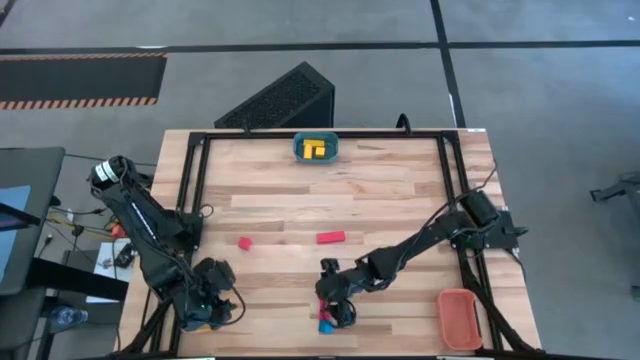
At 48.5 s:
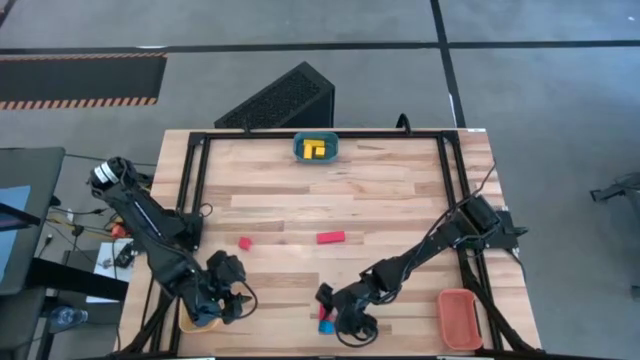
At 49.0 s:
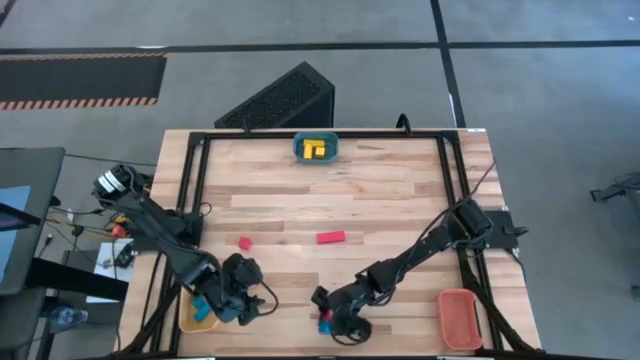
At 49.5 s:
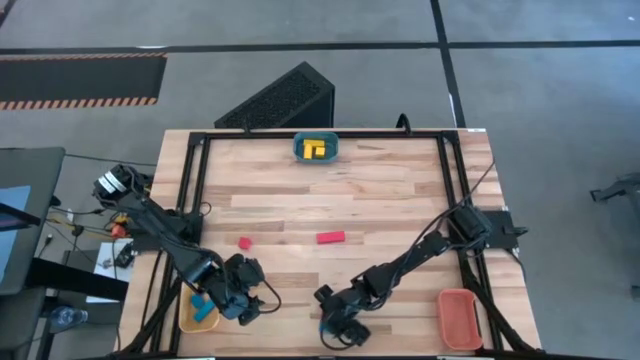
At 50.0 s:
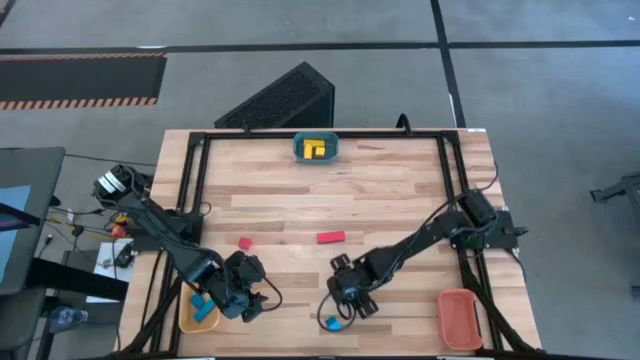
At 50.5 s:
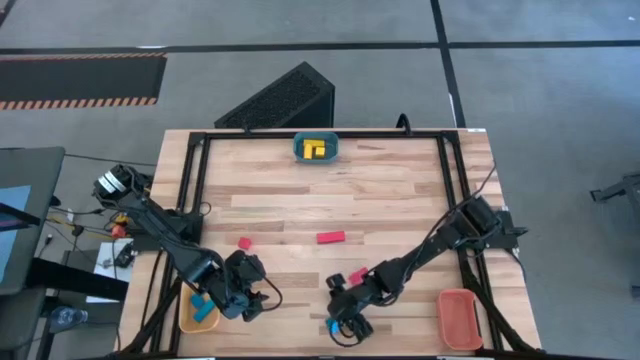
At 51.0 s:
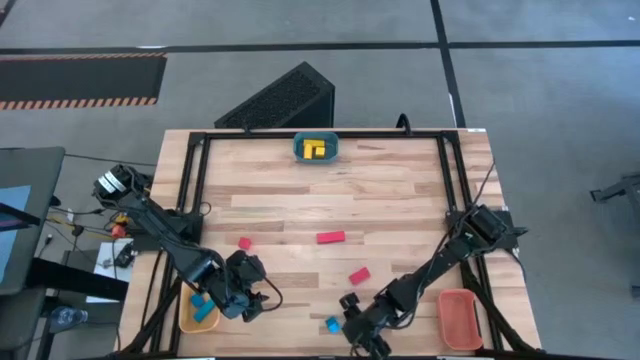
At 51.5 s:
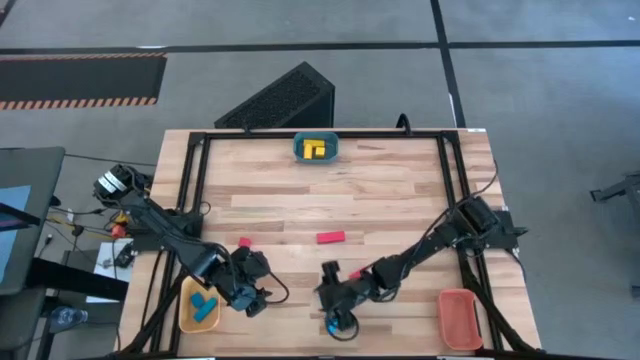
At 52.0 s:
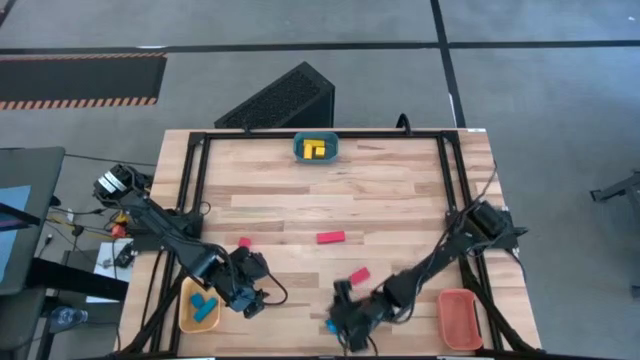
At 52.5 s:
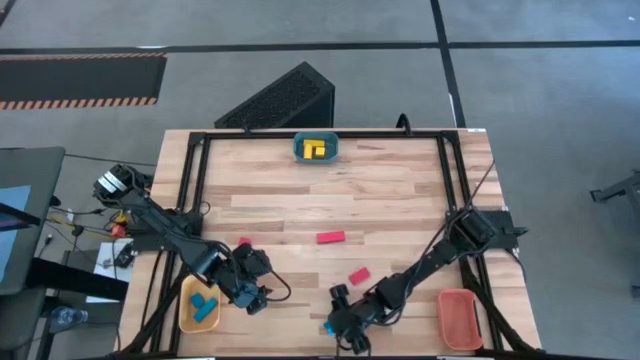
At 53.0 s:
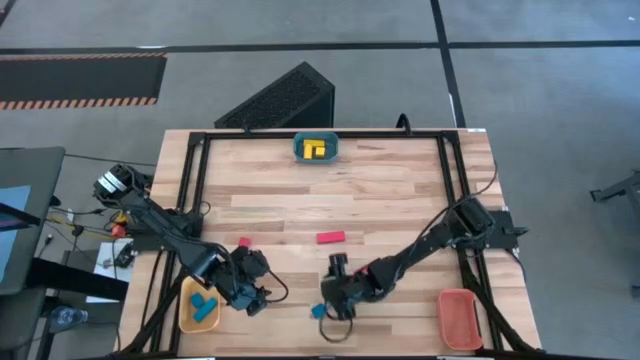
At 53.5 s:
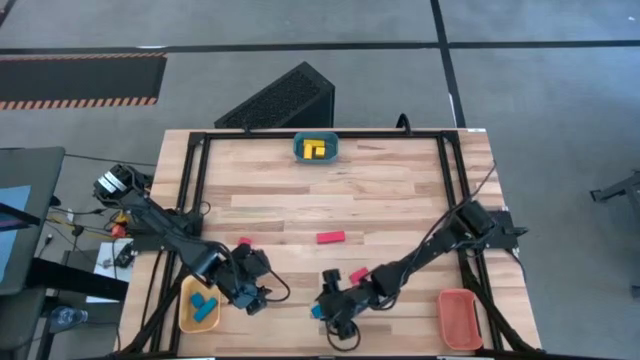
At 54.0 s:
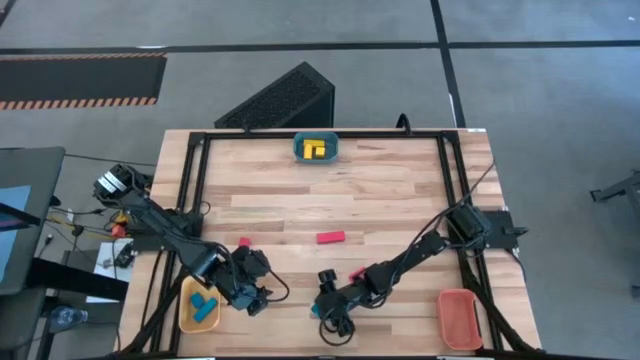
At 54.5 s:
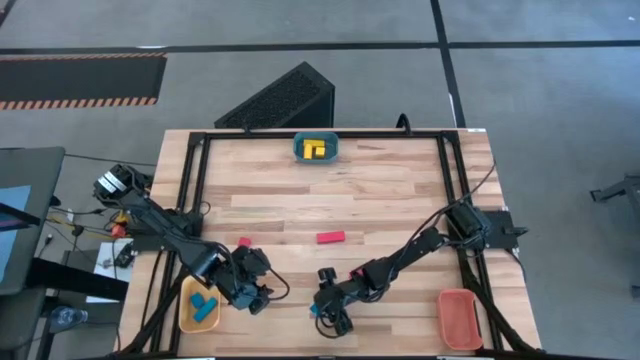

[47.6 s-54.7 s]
Task: Sort & place blocks by color
Put the blue block into the yellow bin

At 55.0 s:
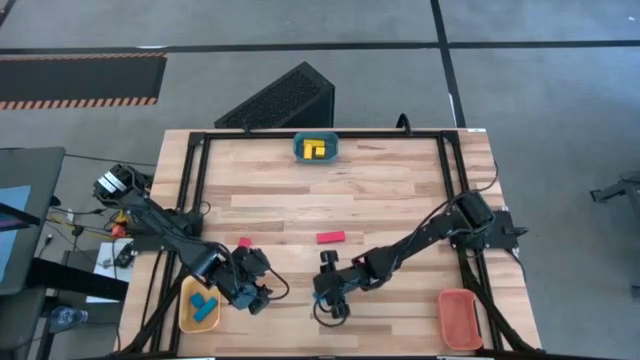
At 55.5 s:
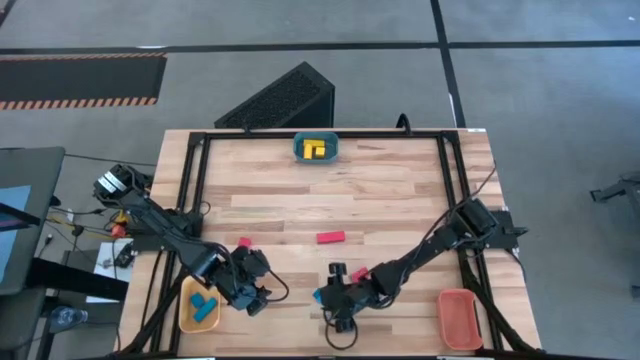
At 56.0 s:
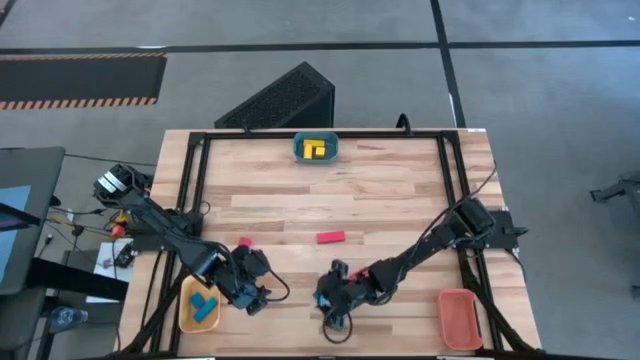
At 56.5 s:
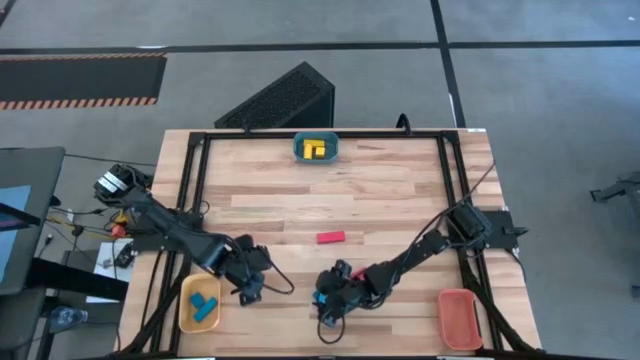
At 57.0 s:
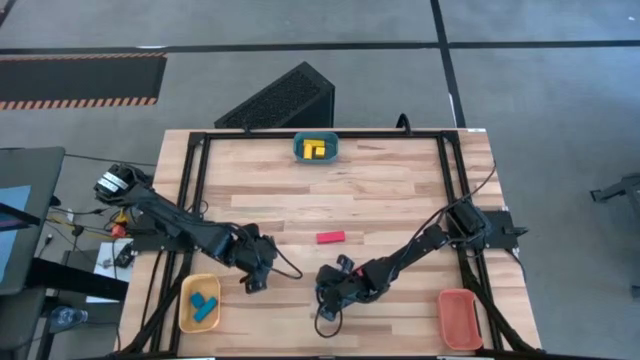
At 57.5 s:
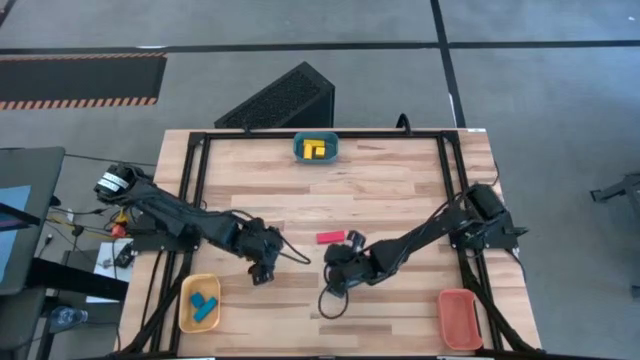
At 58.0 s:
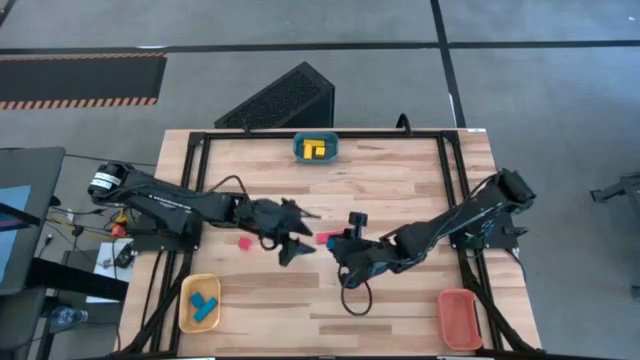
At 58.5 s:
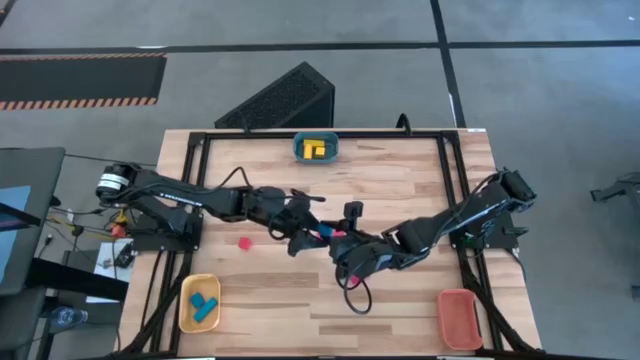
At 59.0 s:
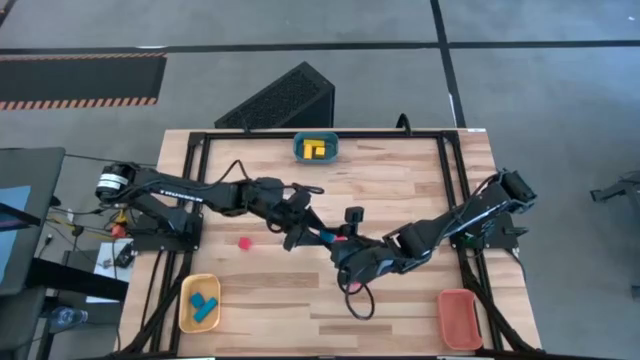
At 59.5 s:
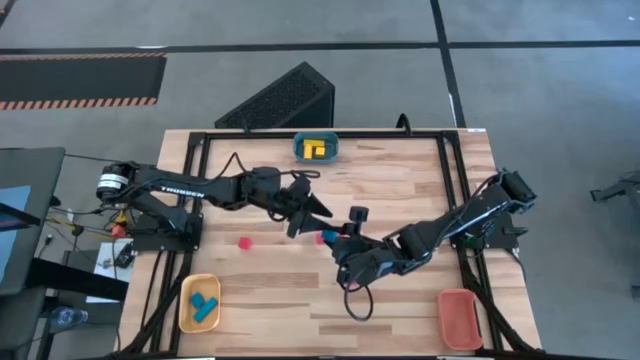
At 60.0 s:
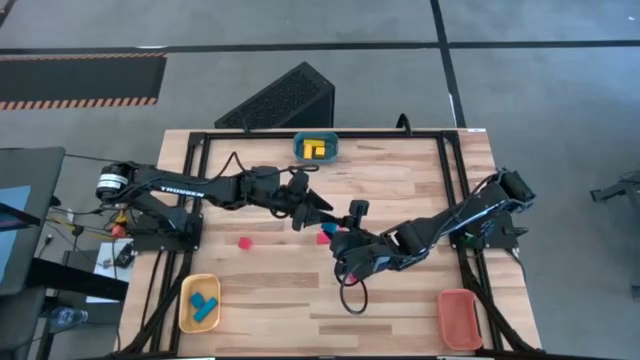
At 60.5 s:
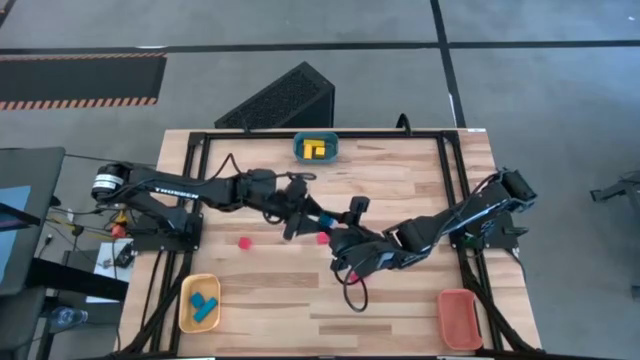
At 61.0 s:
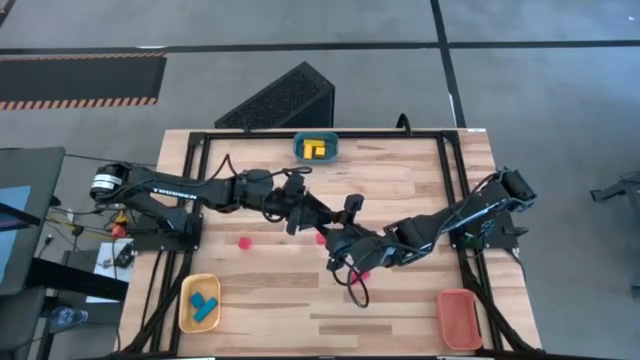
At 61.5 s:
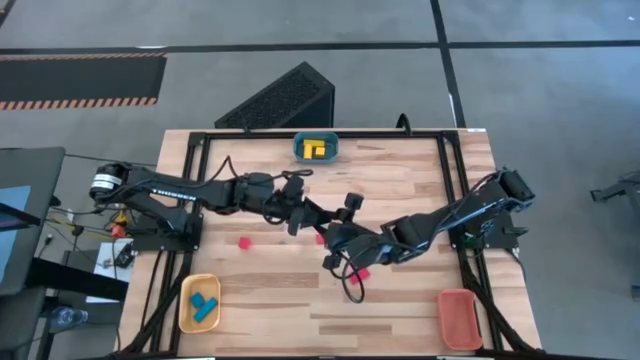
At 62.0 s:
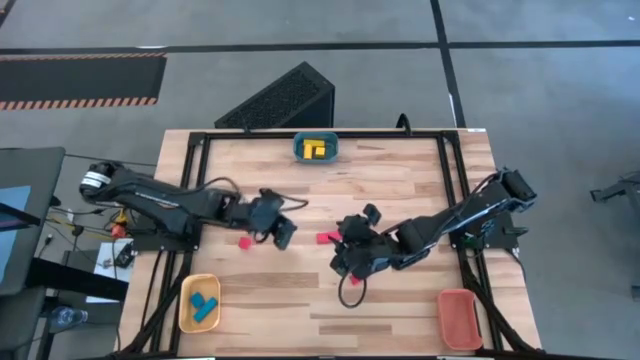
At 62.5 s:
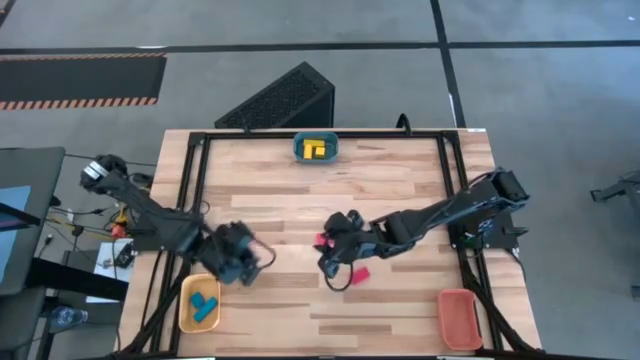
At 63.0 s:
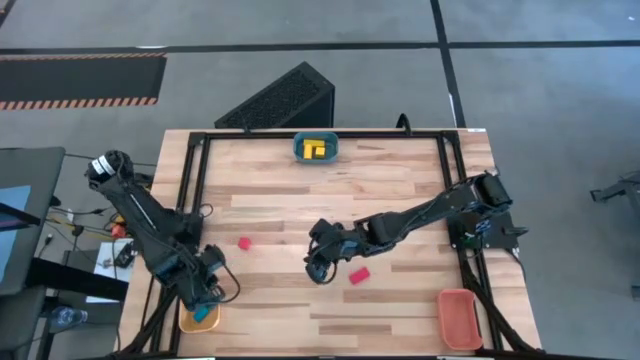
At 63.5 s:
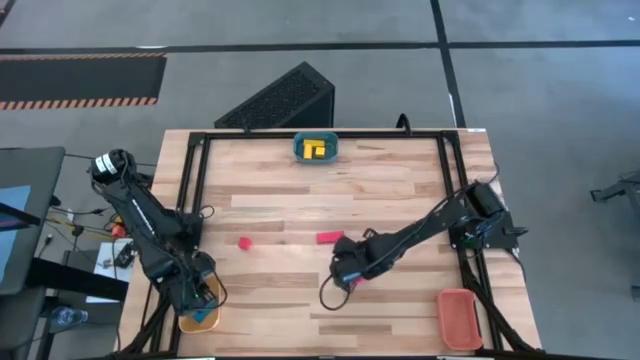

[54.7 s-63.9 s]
Put the blue block into the yellow bin

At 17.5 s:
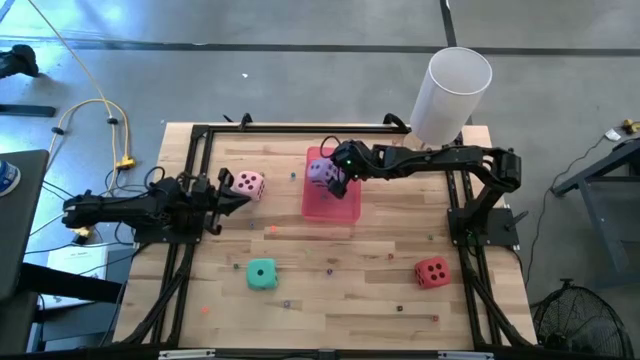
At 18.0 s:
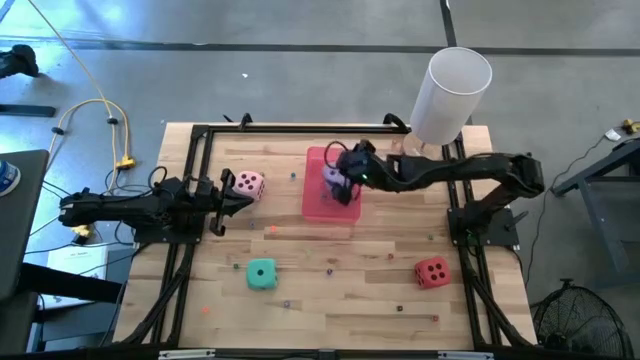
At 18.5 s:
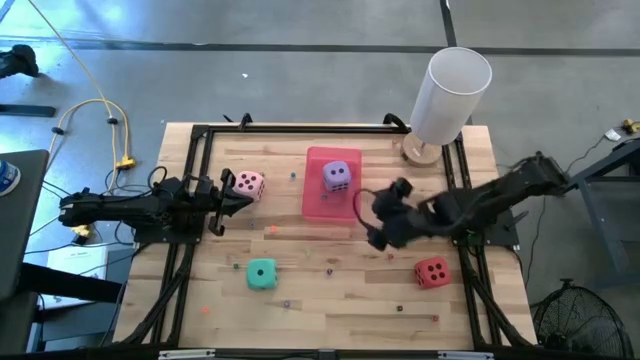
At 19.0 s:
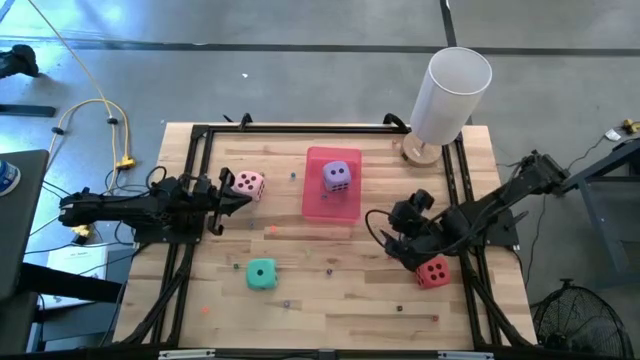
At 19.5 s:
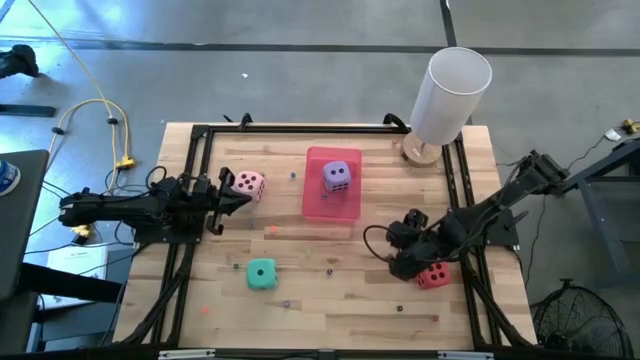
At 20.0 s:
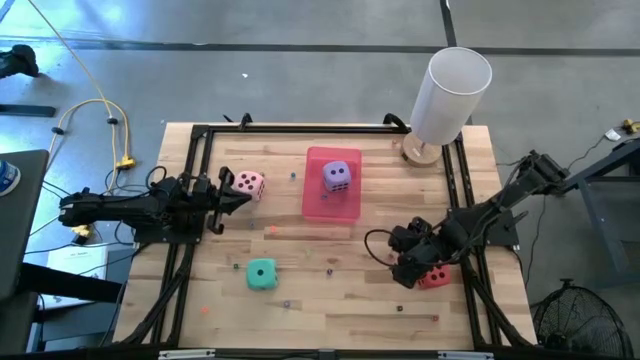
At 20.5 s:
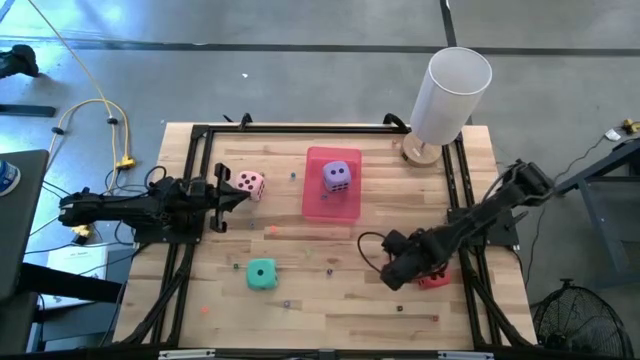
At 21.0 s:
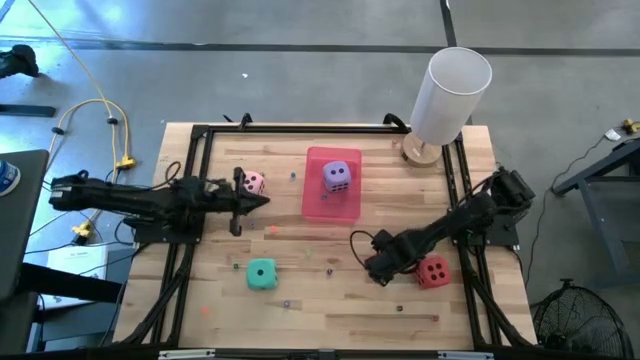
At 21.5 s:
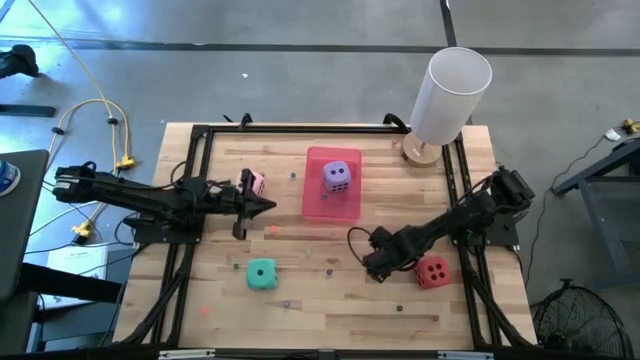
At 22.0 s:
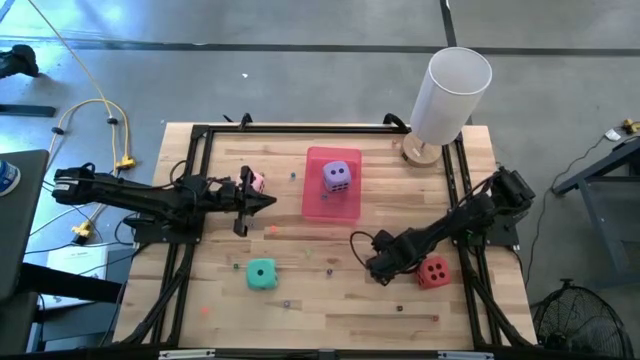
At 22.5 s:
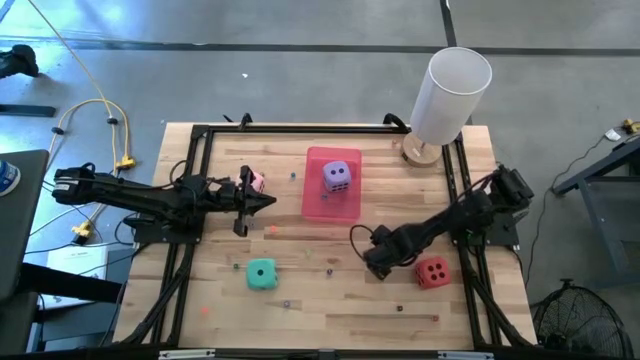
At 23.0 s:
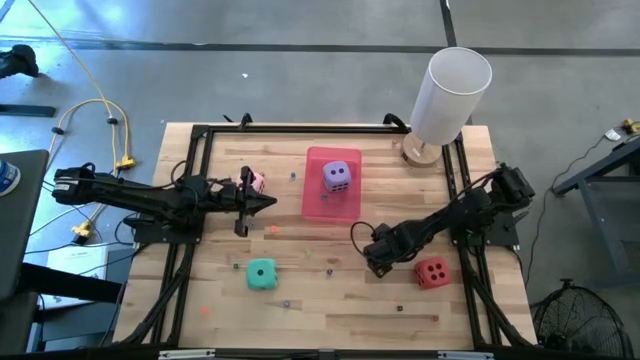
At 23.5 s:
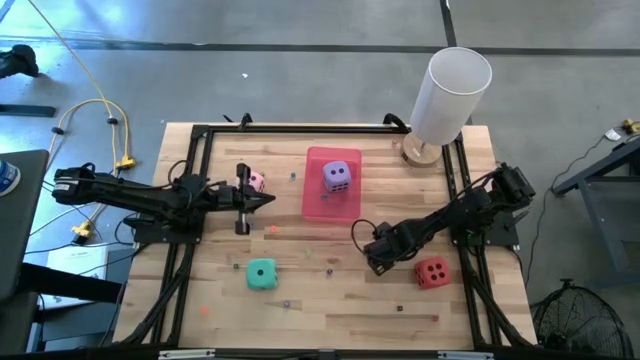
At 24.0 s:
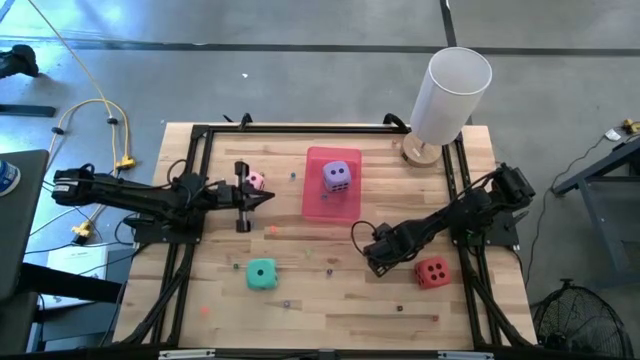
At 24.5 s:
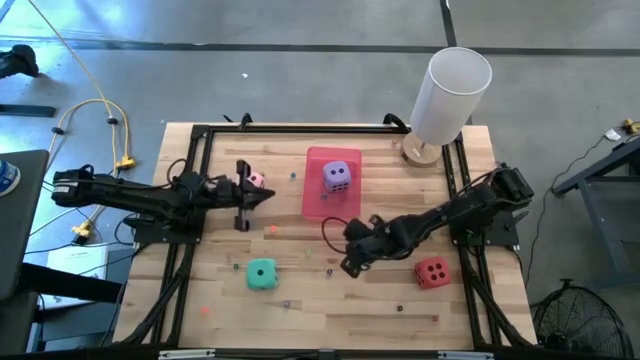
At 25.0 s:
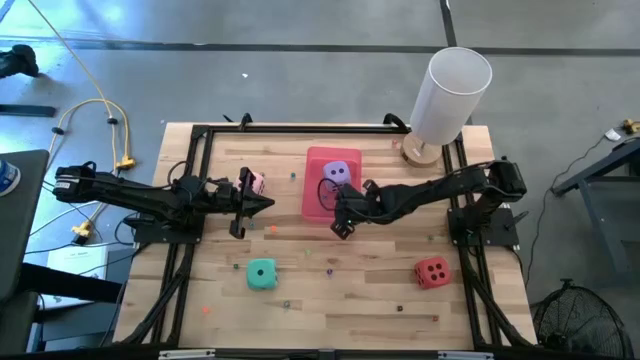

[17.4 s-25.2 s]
Task: Pick & Place Dice
Put the small red die into the red bin
